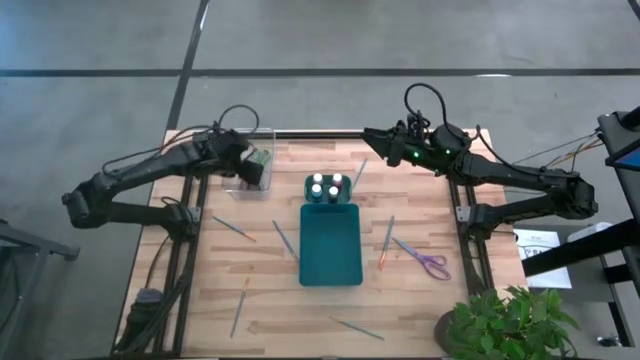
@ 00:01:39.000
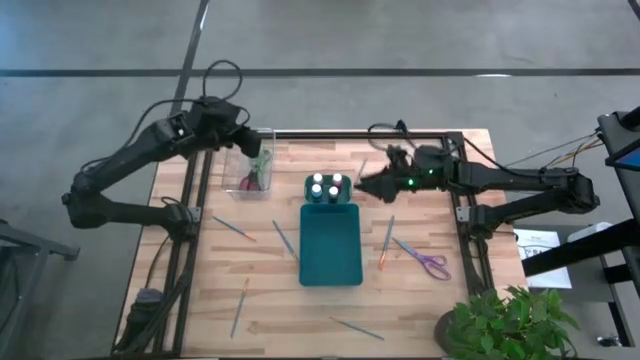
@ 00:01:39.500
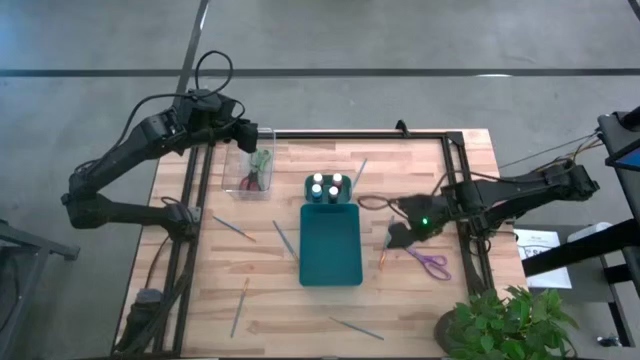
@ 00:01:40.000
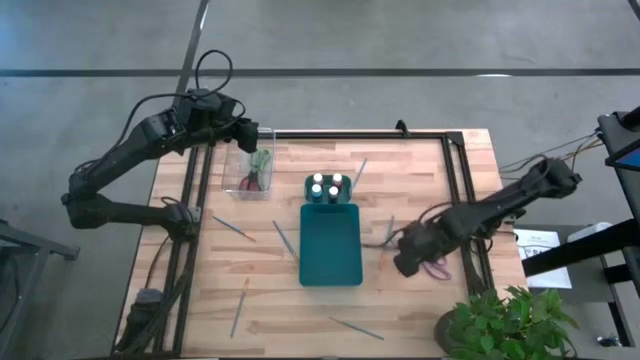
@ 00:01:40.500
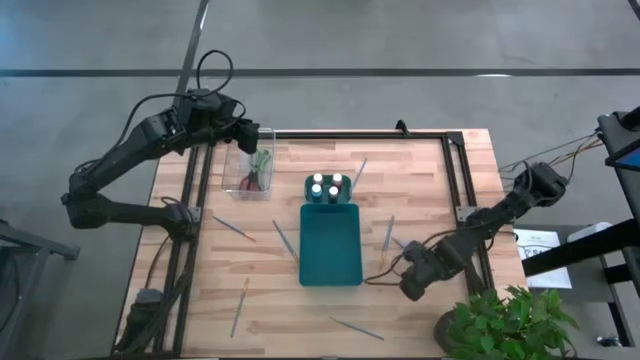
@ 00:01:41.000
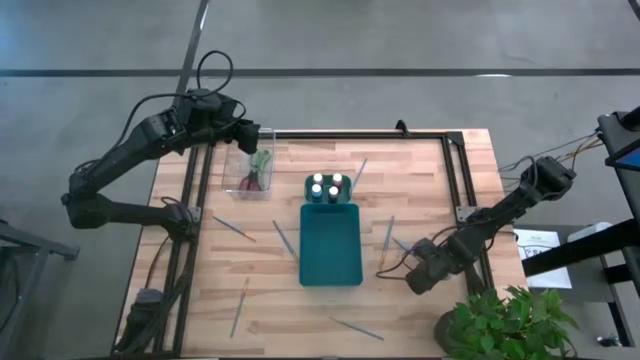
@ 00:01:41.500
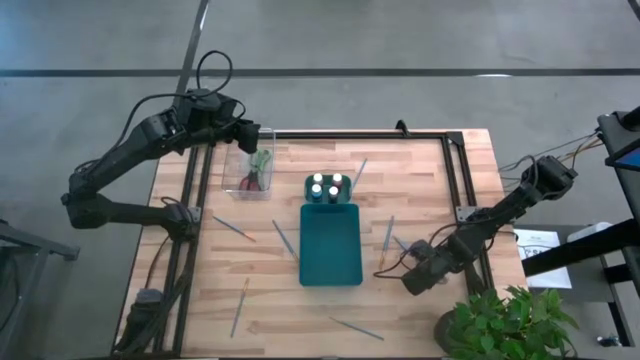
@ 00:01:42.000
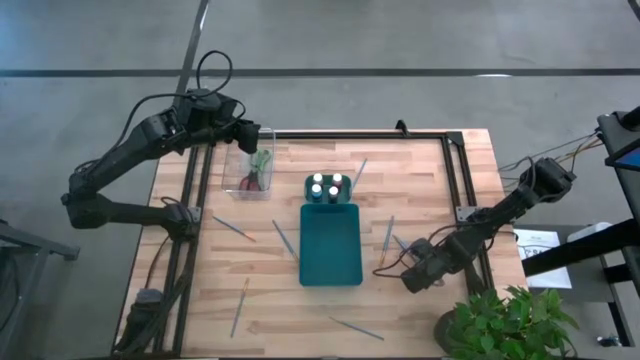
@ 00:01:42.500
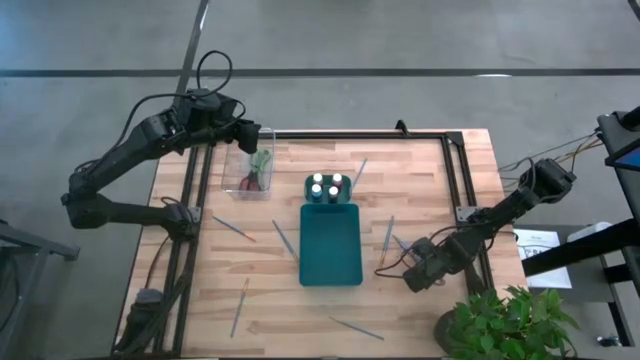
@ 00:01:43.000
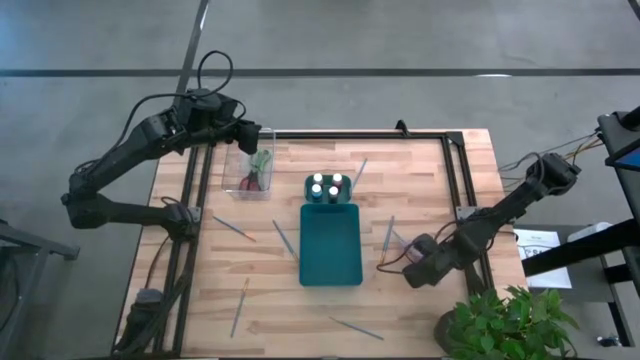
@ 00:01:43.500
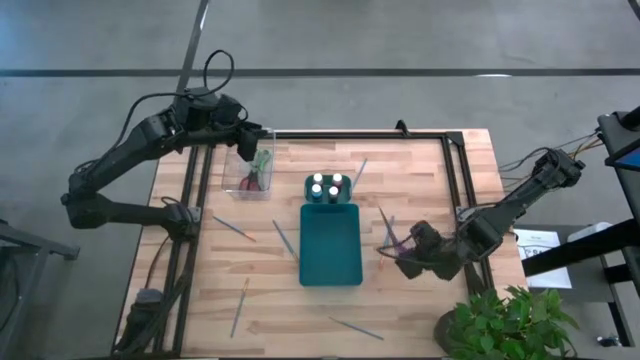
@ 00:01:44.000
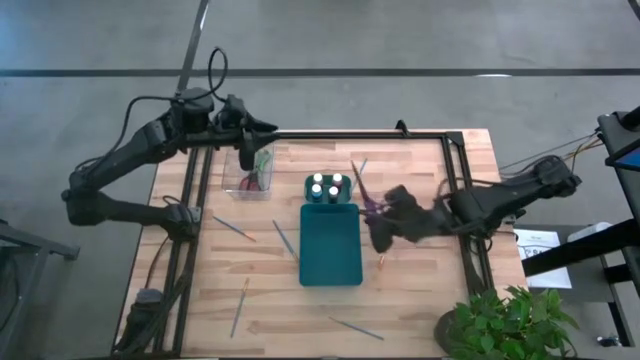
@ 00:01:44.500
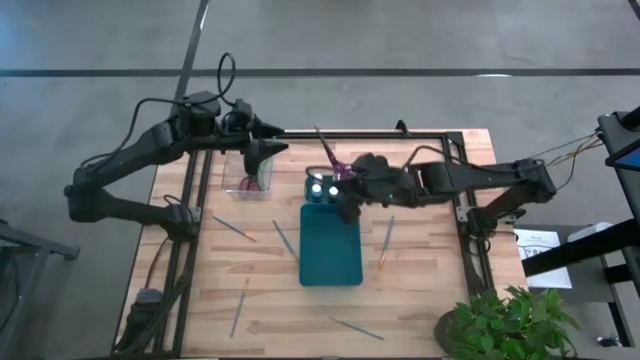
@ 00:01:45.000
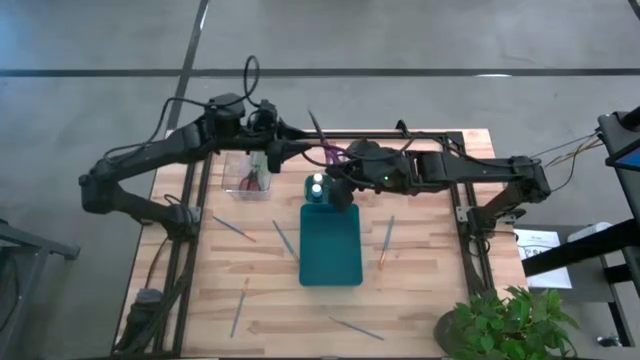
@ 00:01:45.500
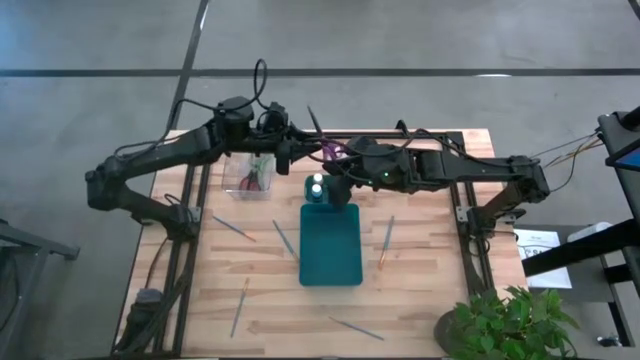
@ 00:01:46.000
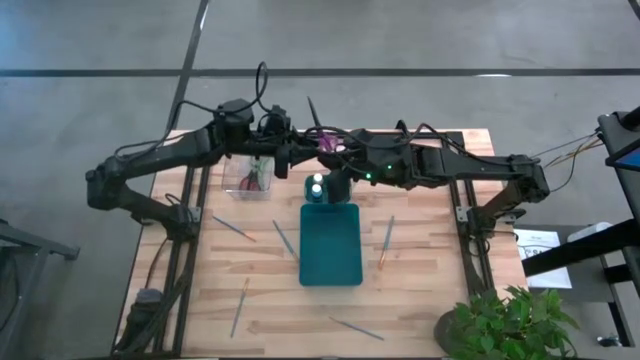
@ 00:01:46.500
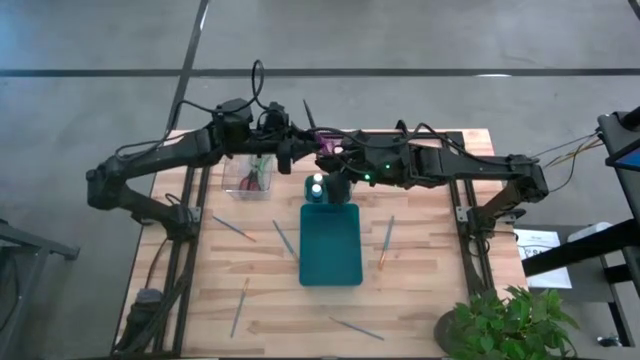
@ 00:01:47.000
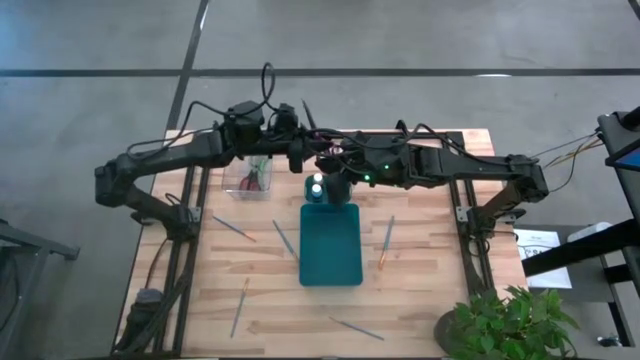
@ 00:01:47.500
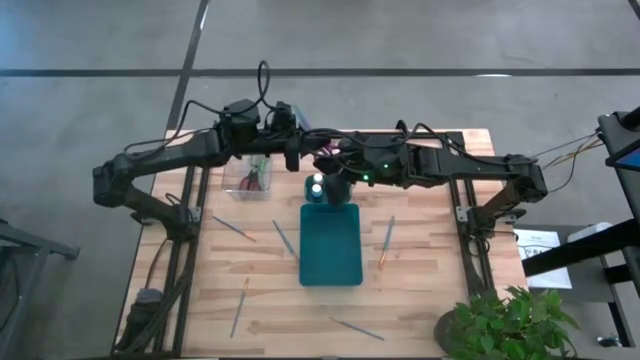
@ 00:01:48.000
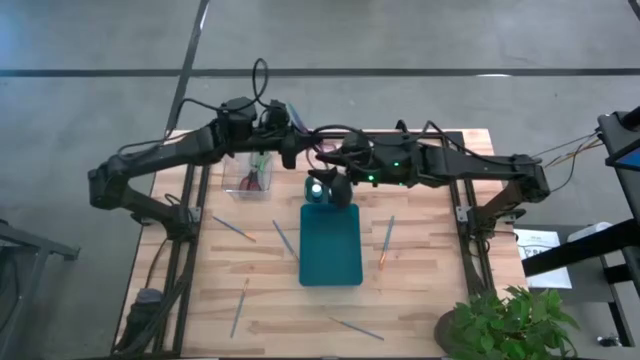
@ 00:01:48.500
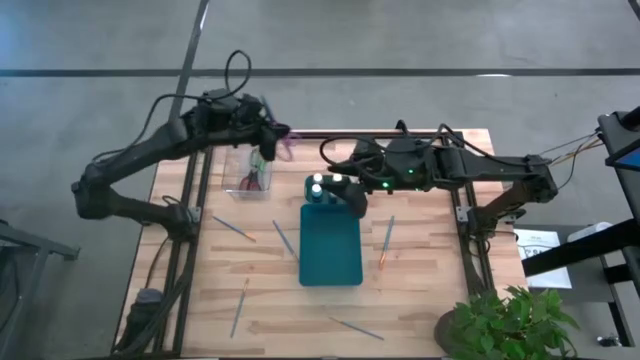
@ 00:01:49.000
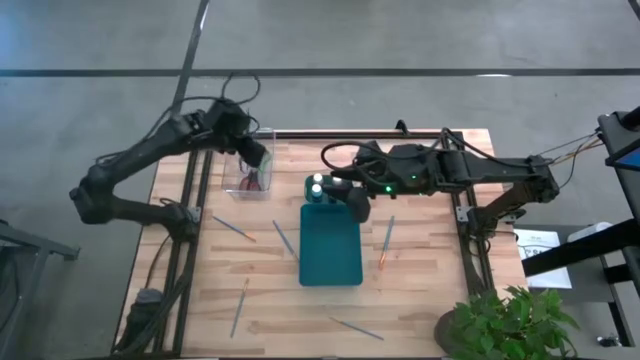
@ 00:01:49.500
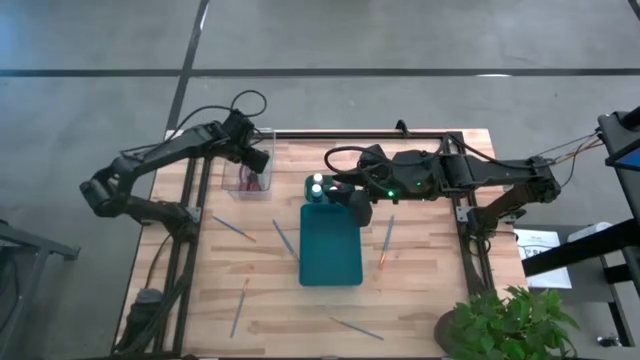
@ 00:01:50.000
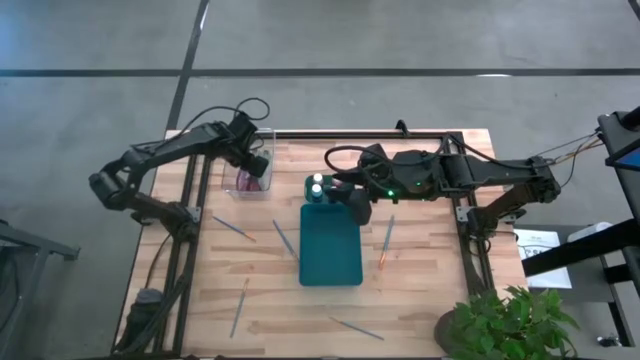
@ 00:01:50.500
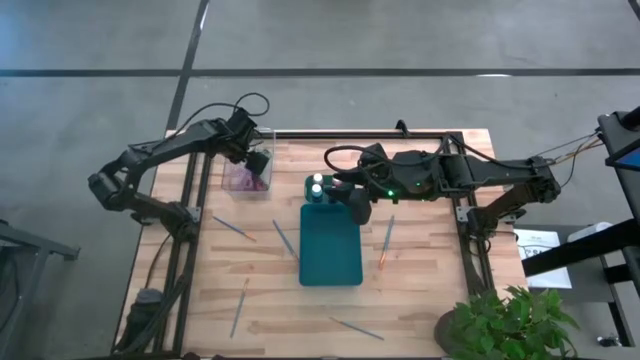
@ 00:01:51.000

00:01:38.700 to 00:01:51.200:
Task: Pick & Place Paint Supplies
Put the purple scissors into the transparent bin

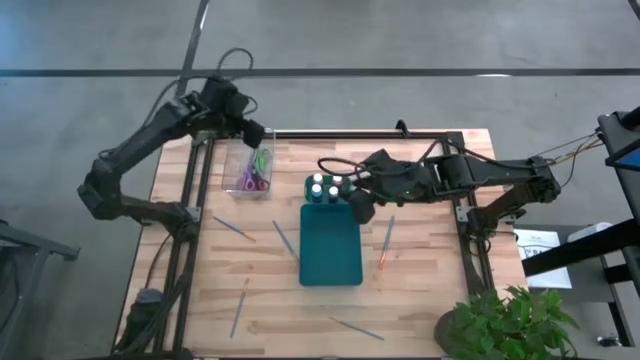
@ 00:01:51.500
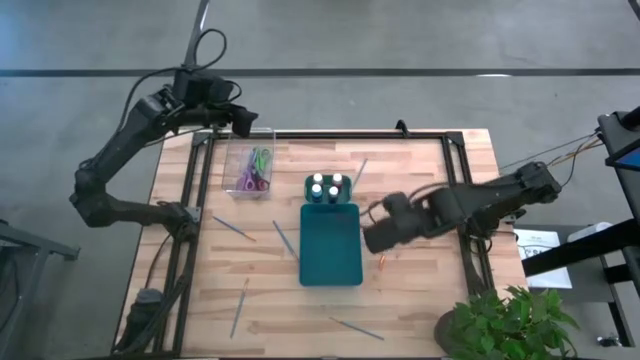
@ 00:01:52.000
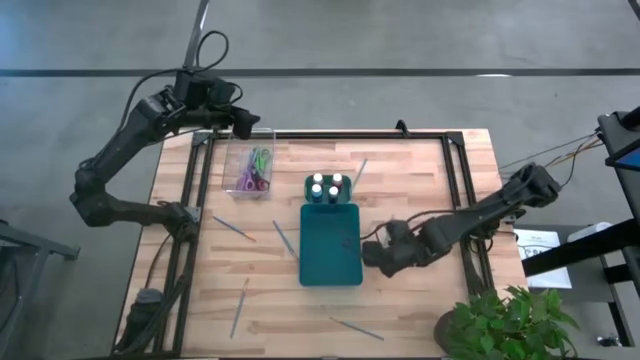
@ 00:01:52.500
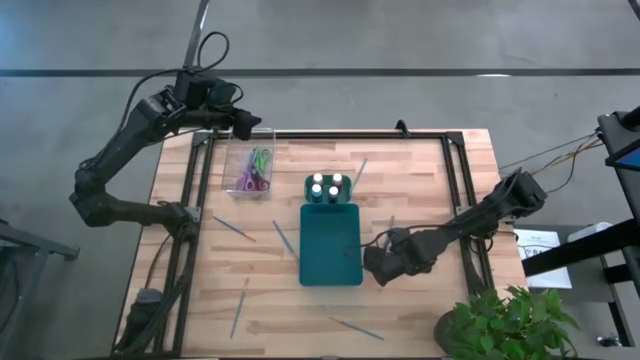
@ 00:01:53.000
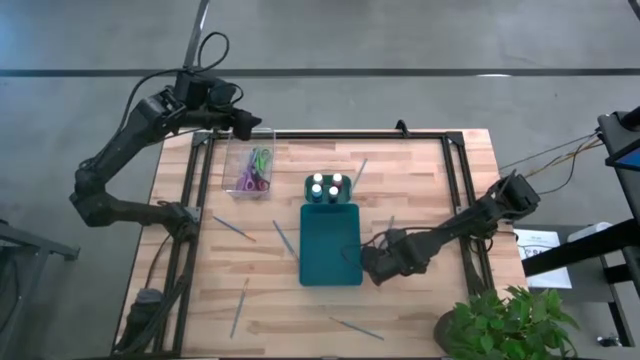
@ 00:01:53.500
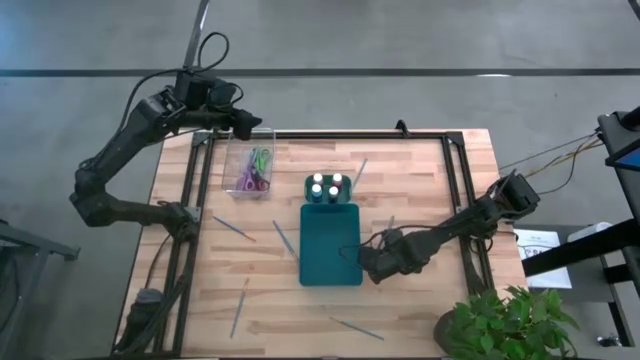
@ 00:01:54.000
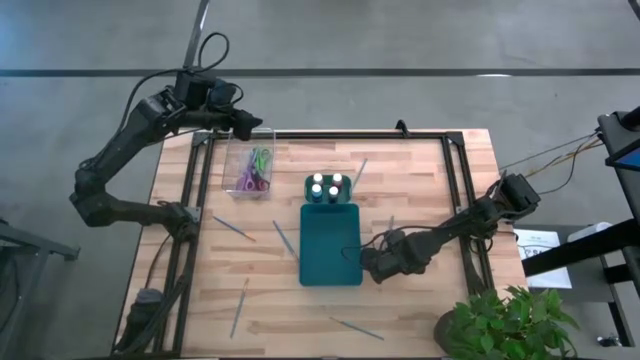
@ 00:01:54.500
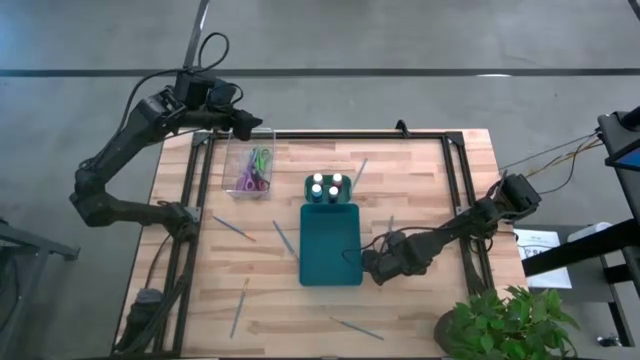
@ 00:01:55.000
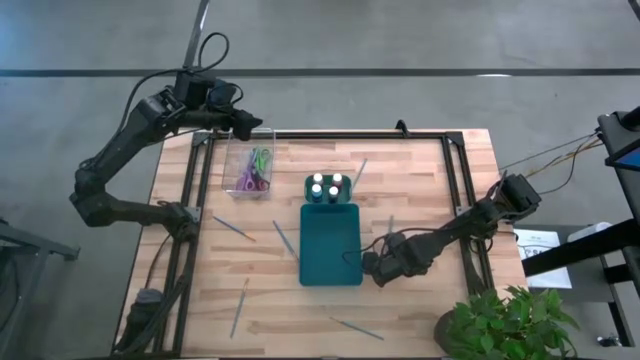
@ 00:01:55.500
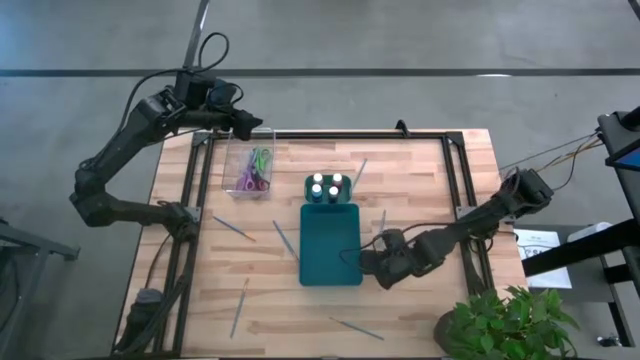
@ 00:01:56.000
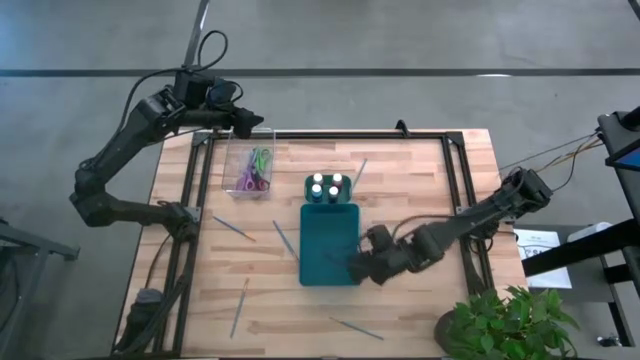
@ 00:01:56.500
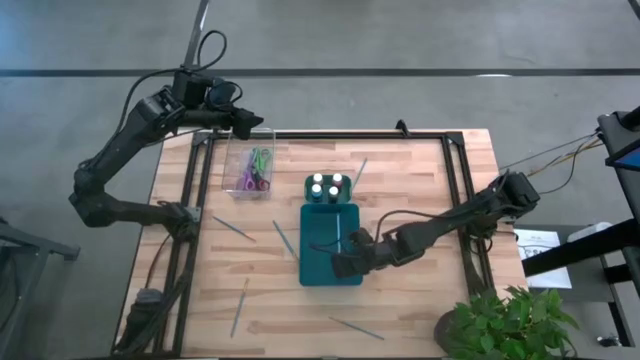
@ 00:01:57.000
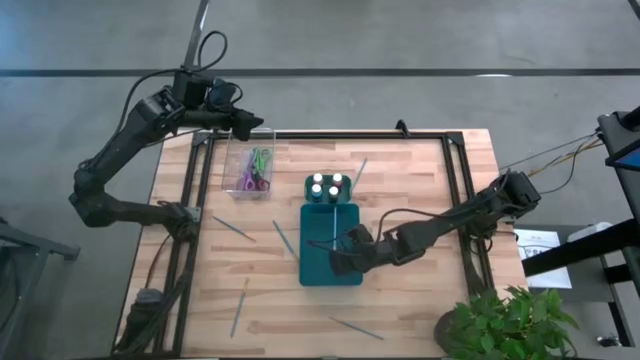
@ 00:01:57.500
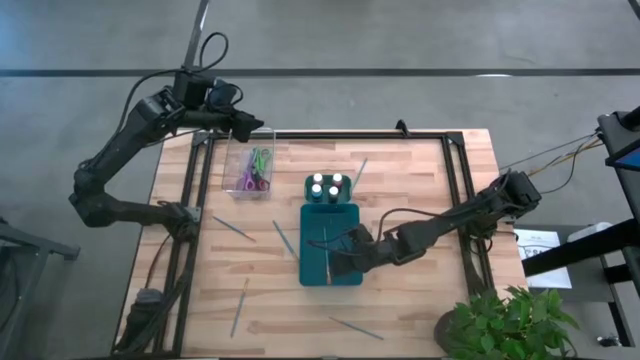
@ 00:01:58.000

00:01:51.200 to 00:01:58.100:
Put the blue paintbrush into the blue bin
